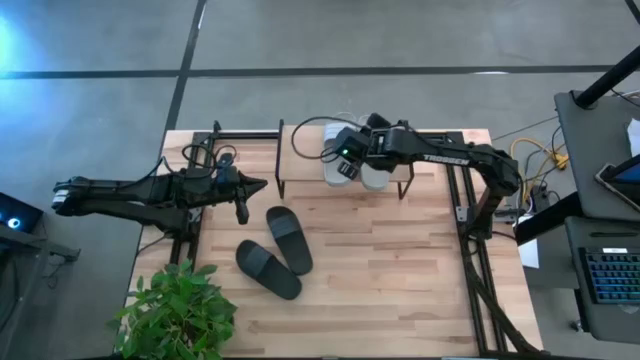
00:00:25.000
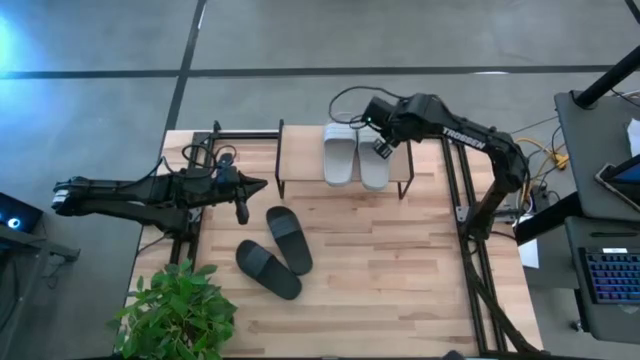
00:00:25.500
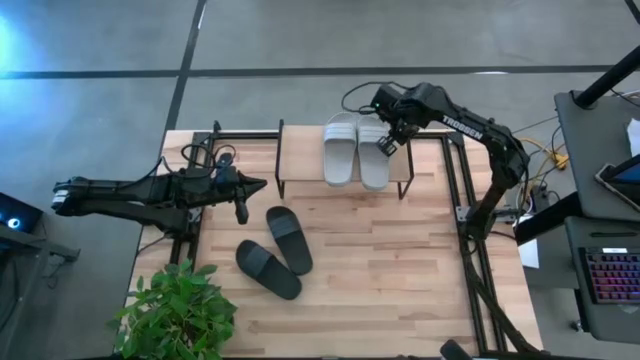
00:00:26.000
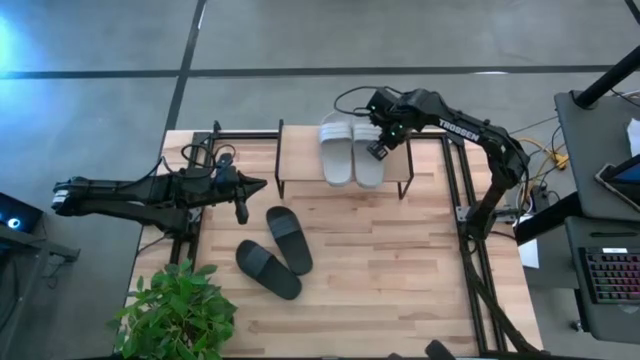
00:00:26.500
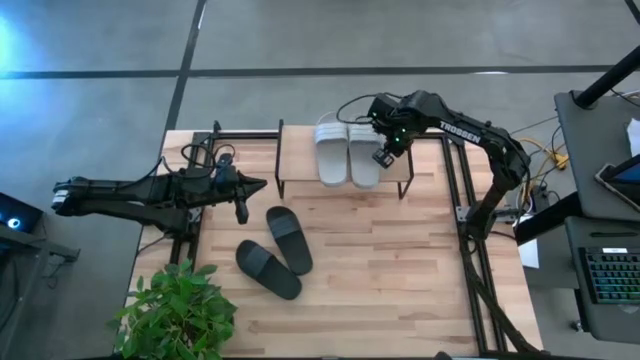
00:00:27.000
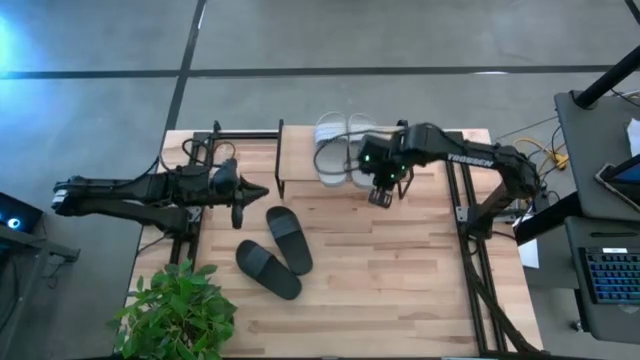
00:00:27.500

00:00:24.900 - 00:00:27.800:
Task: Pick and place slides into the shelf
Adjust the gray slides on the shelf

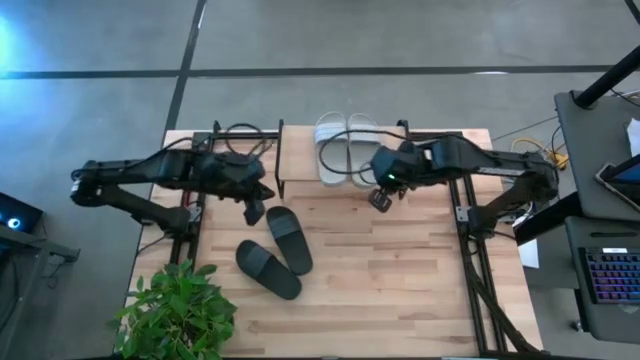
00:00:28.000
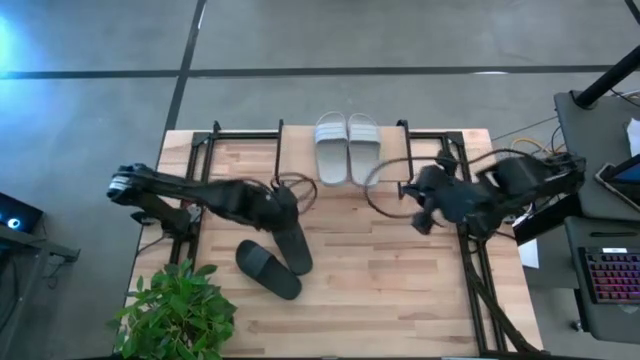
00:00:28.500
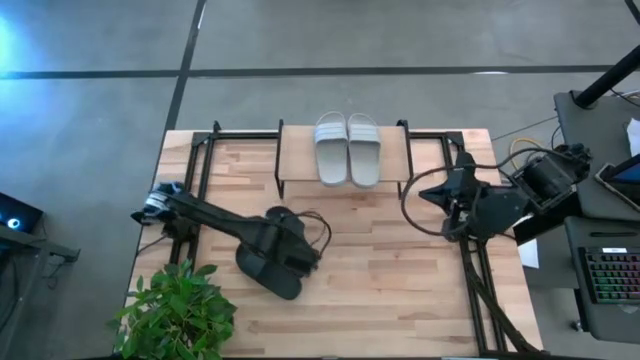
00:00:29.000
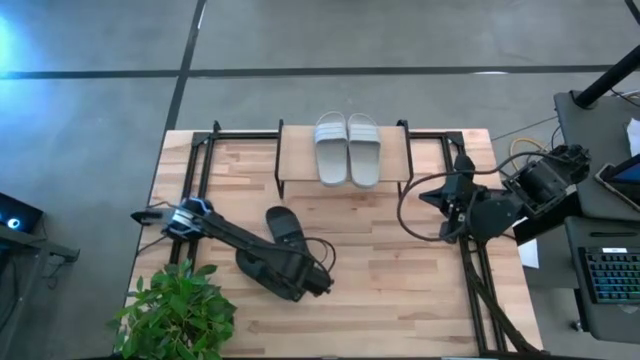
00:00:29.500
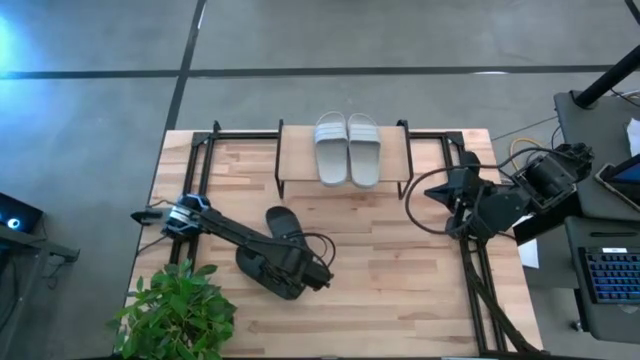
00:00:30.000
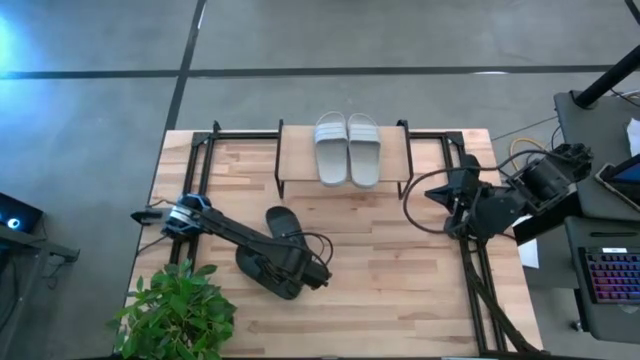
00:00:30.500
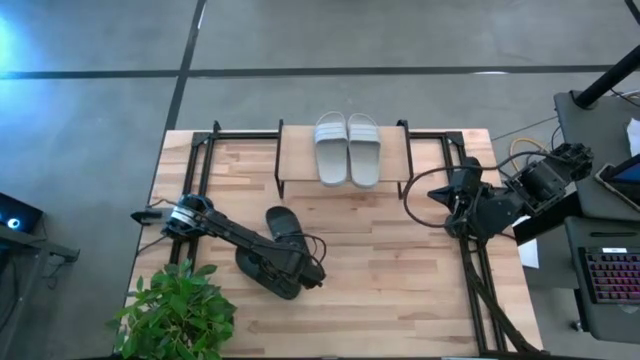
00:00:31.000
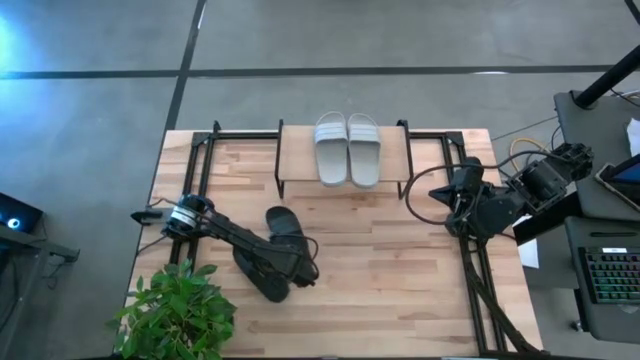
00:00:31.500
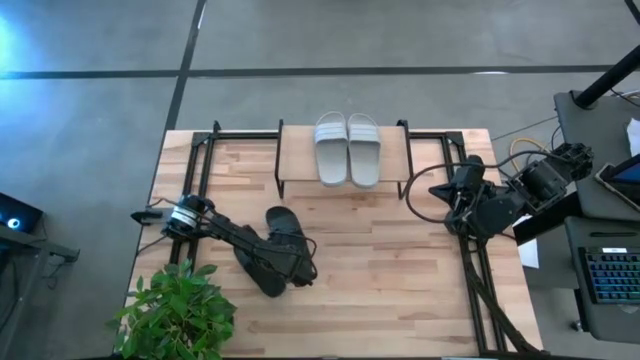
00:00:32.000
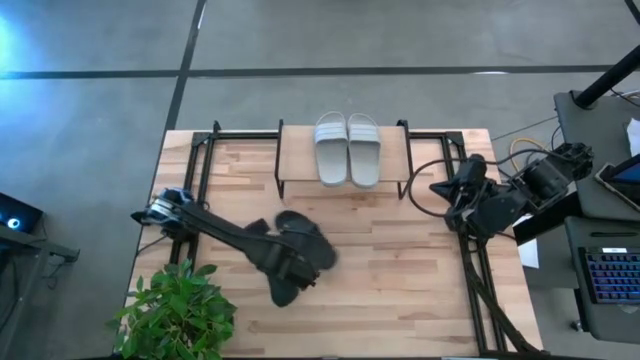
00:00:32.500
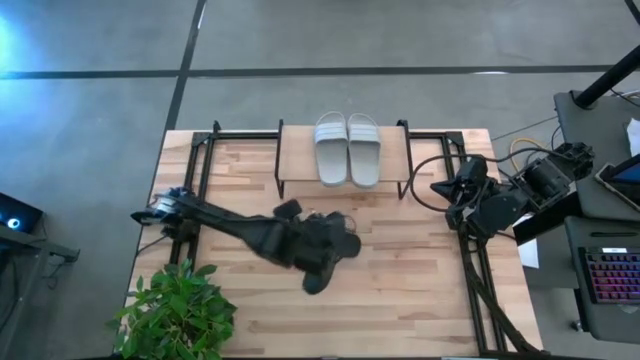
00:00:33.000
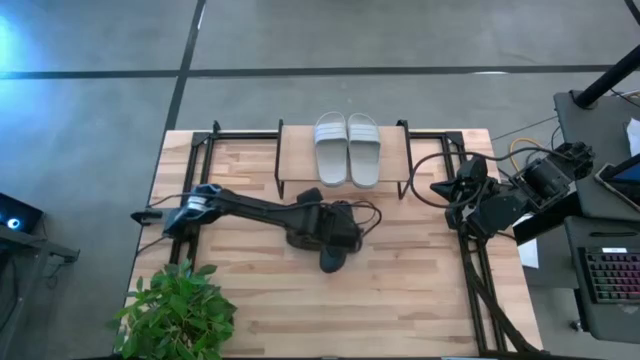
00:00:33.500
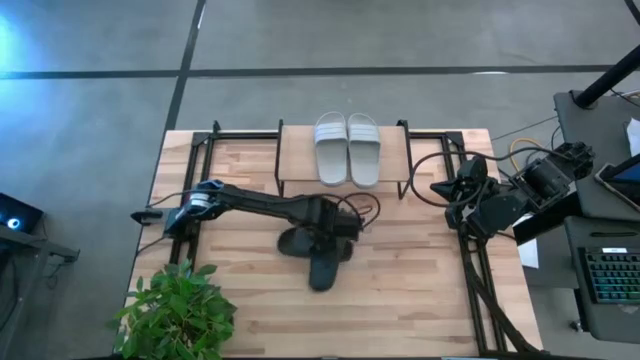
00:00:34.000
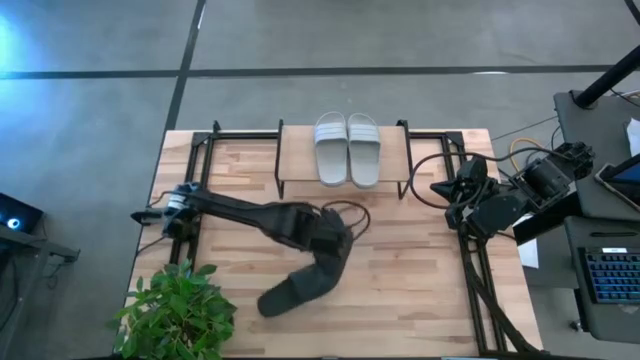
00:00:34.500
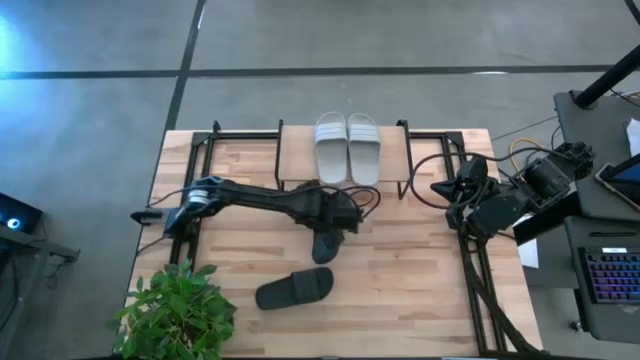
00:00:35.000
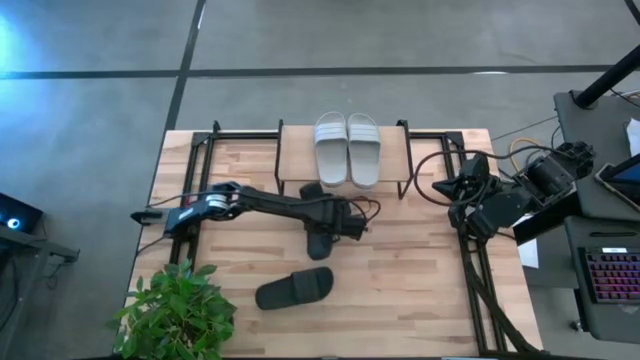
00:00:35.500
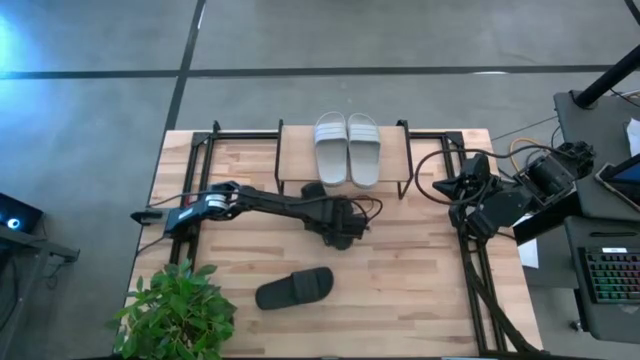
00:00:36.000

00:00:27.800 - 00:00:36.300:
Put the left black slide under the shelf

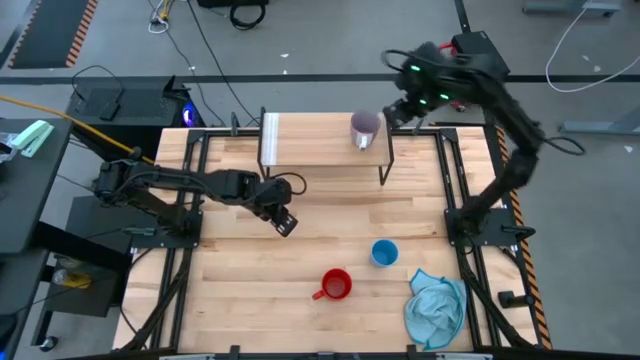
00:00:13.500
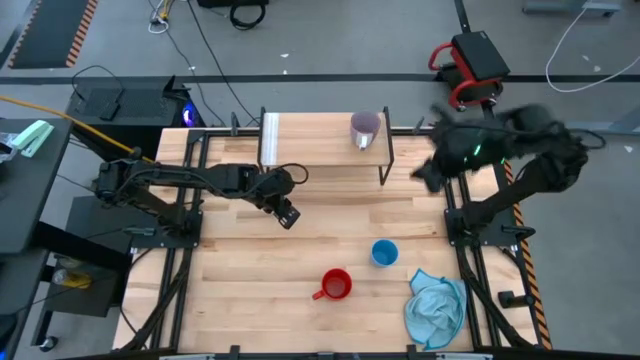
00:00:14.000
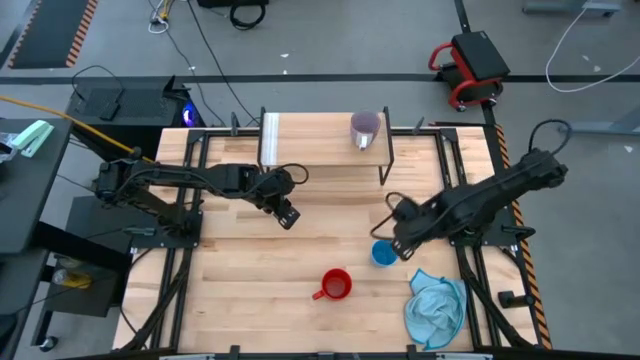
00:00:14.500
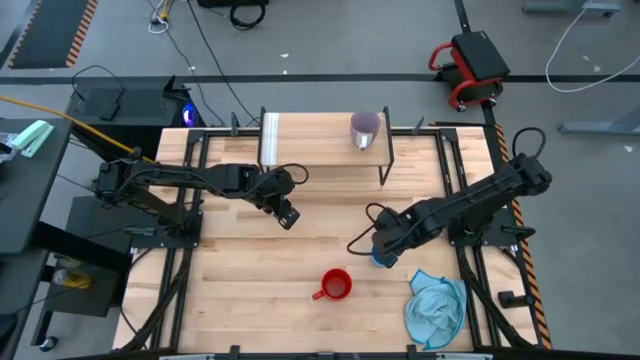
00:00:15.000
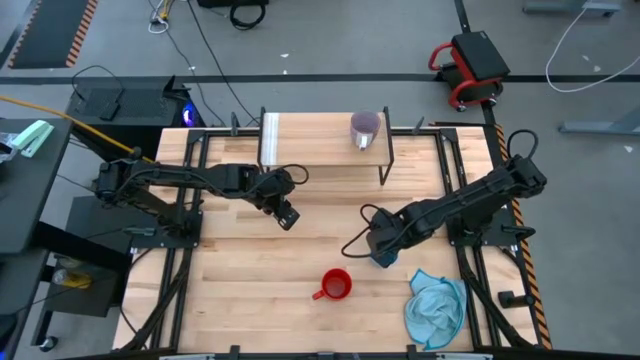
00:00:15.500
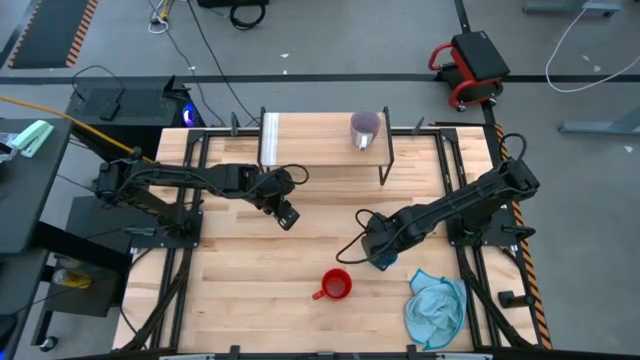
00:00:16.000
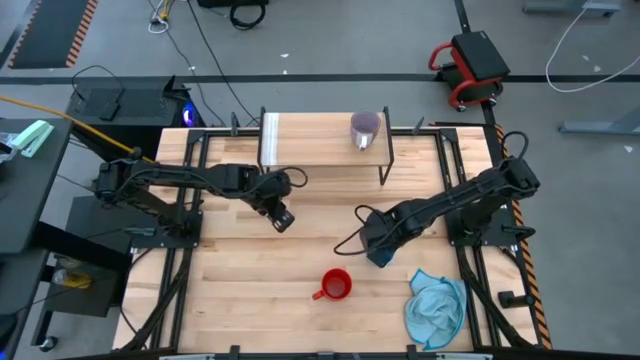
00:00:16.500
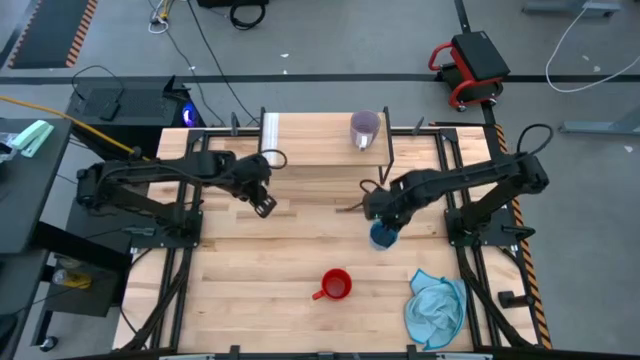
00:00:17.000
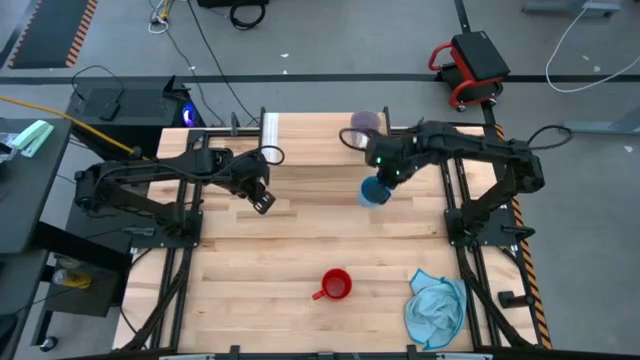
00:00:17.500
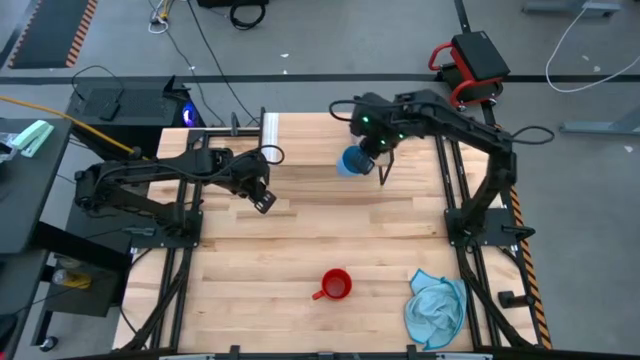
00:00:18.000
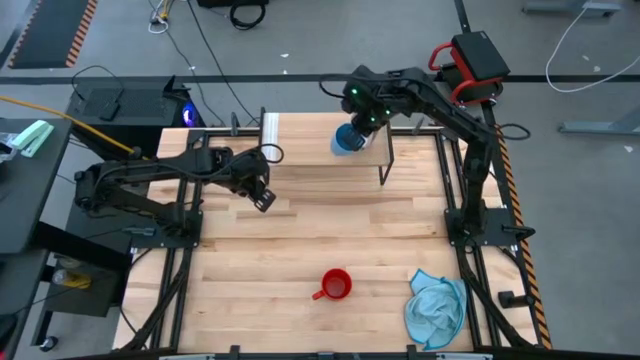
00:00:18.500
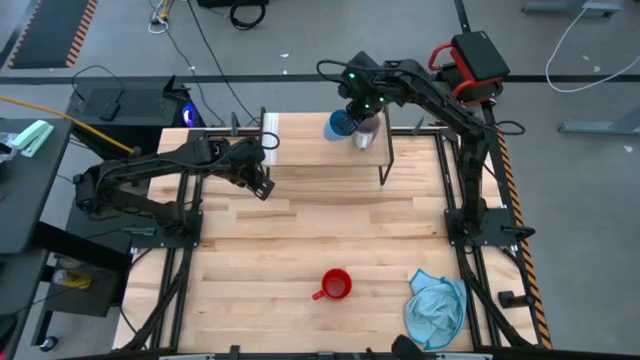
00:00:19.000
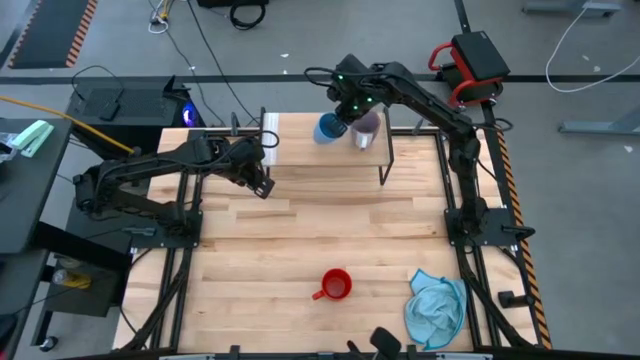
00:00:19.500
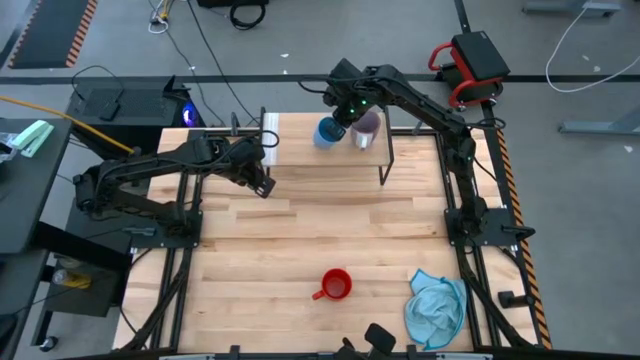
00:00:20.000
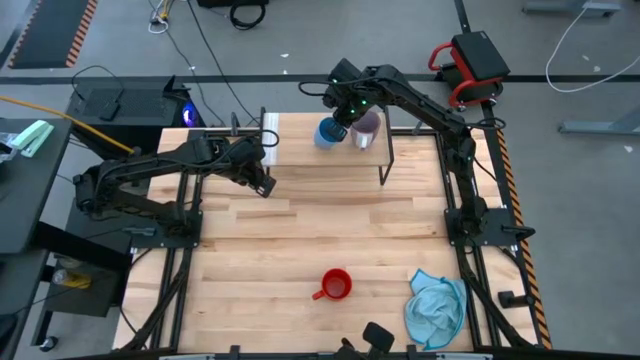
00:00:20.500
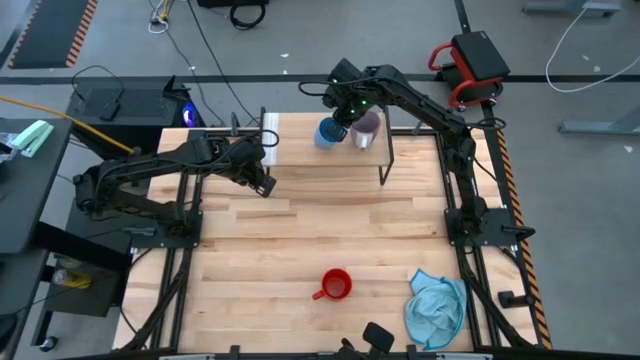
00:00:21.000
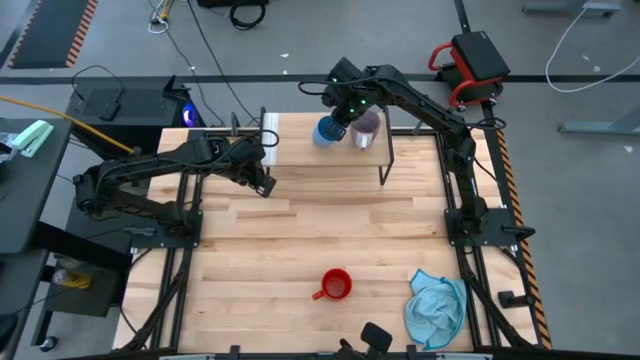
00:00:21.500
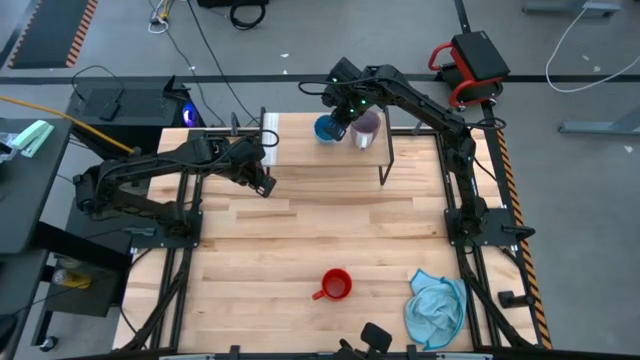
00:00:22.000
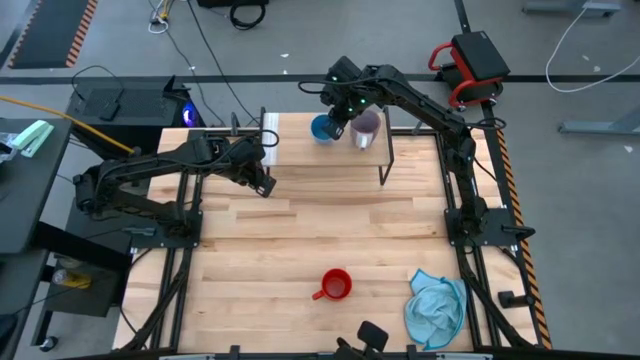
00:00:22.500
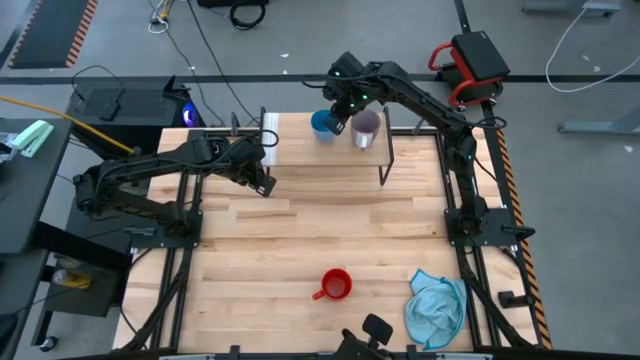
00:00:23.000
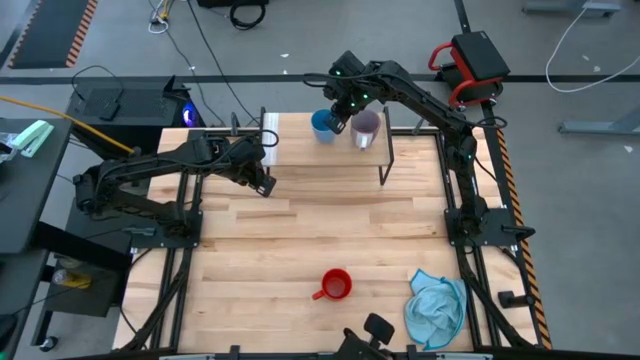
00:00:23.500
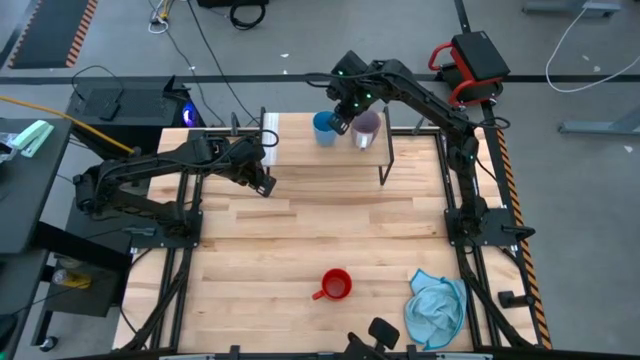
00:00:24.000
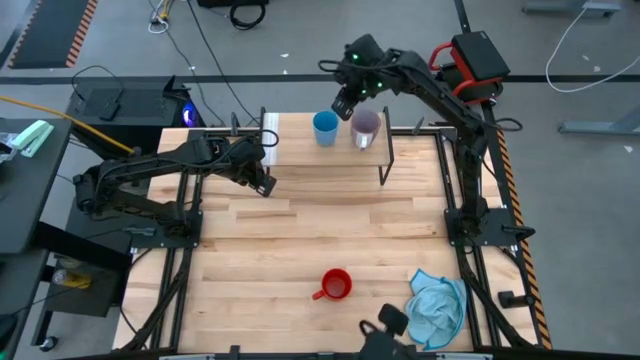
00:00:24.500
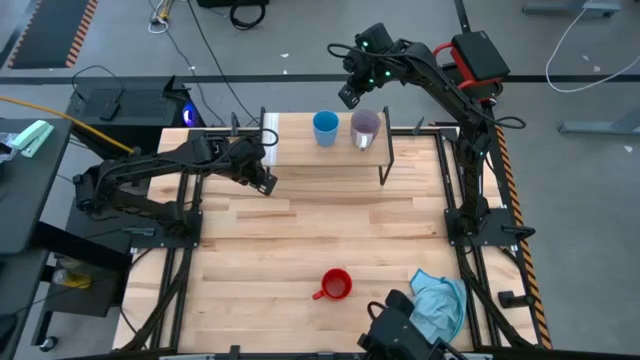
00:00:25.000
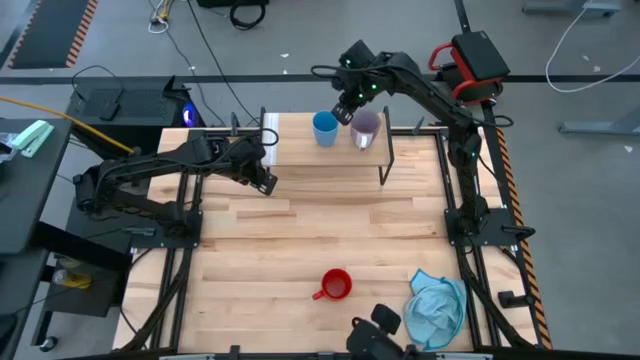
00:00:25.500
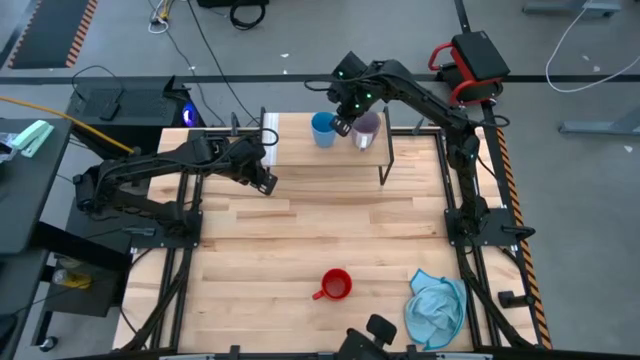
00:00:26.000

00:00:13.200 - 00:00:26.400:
Task: Stack small to large cups/mugs on shelf
Put the blue cup on the shelf
